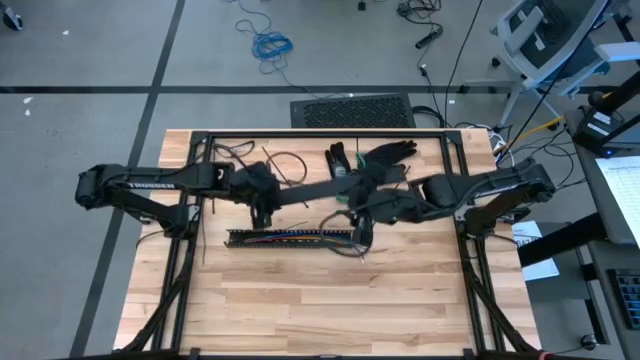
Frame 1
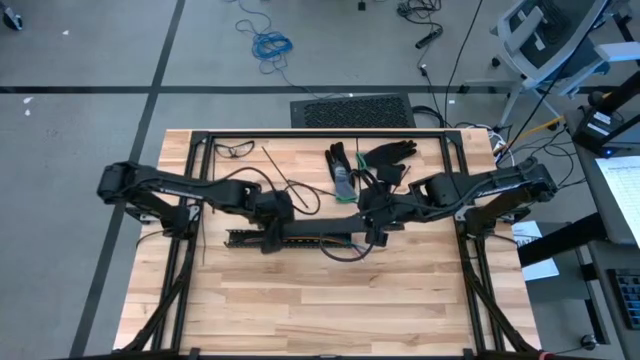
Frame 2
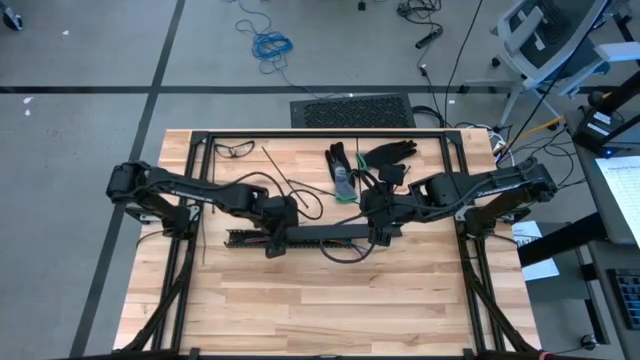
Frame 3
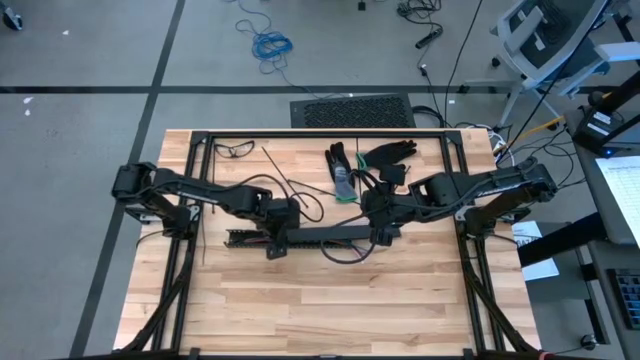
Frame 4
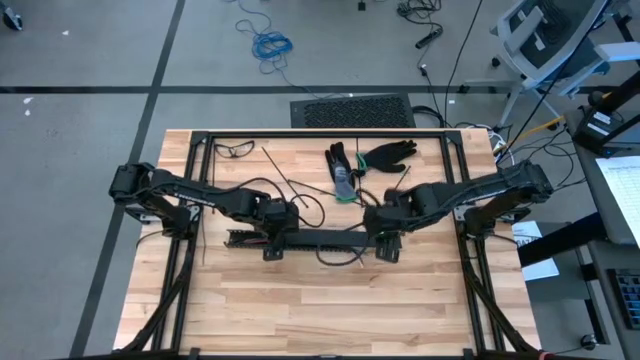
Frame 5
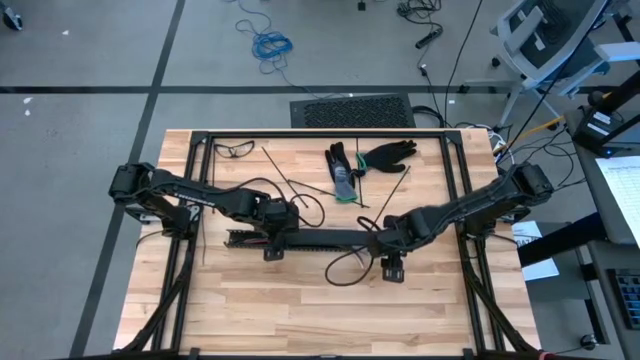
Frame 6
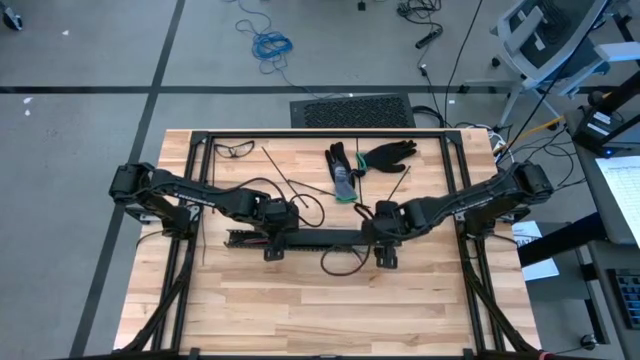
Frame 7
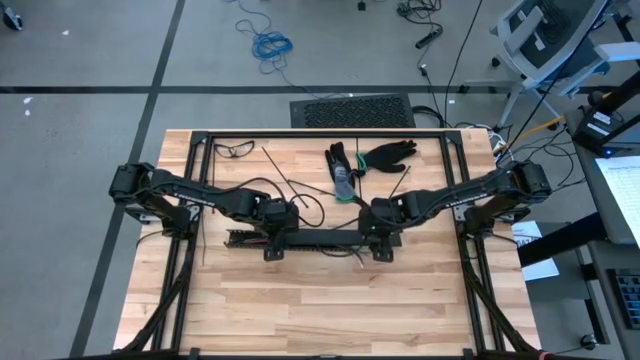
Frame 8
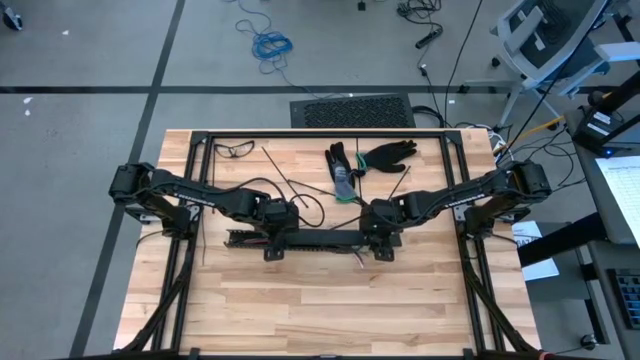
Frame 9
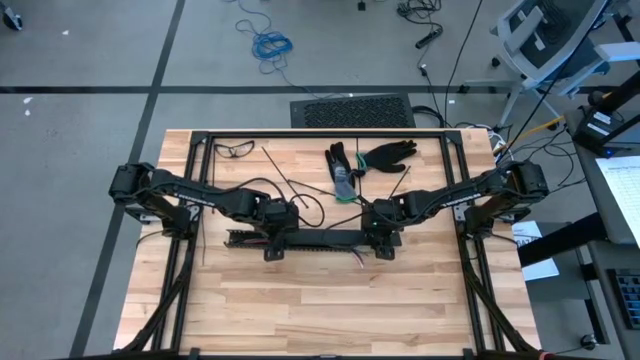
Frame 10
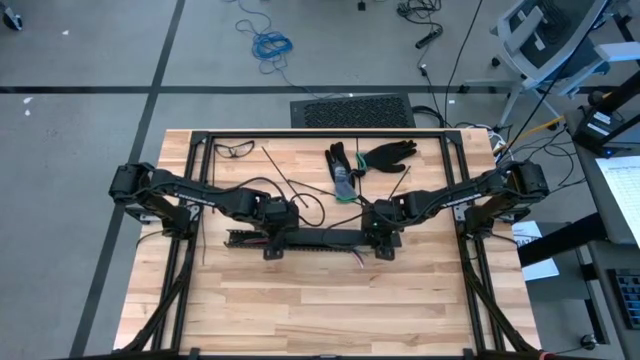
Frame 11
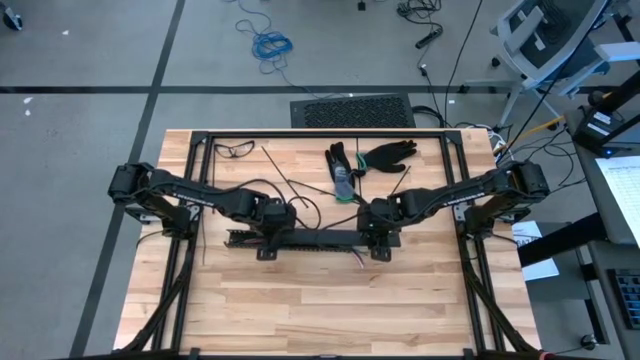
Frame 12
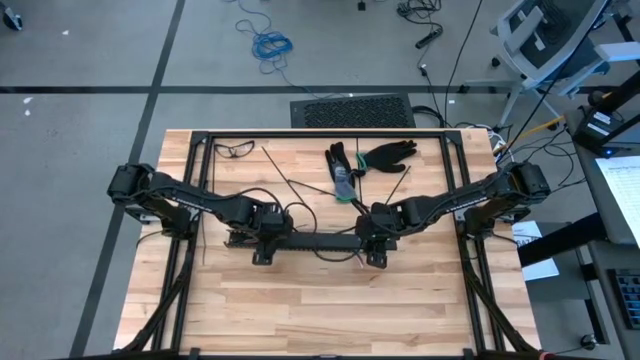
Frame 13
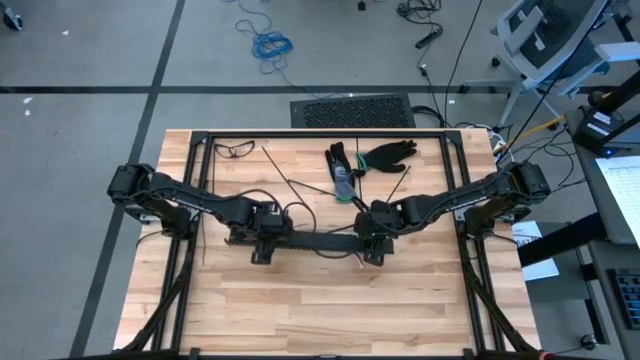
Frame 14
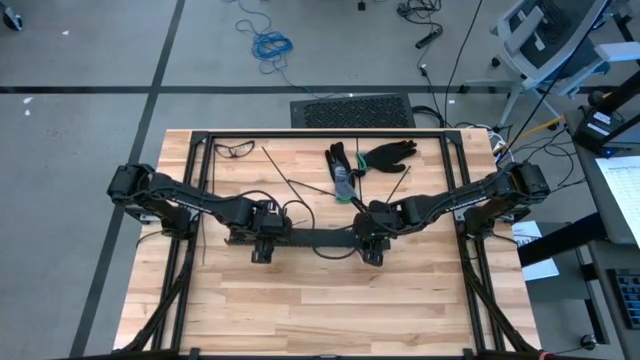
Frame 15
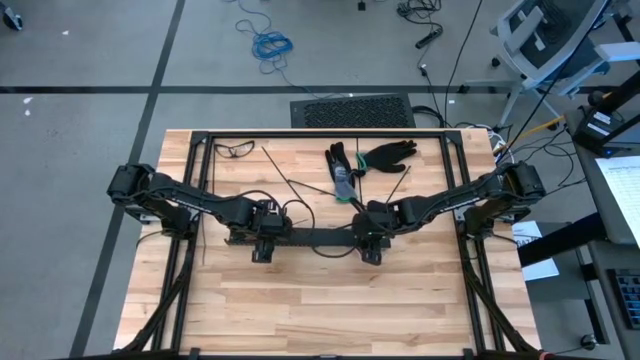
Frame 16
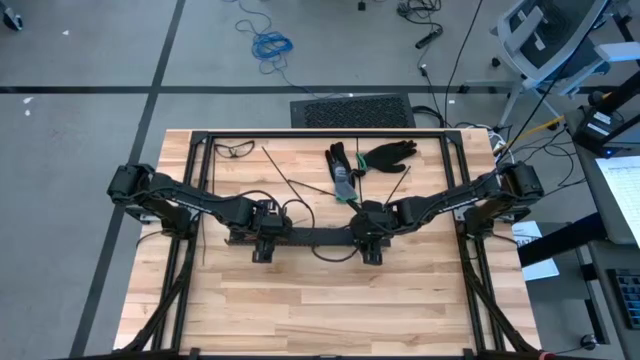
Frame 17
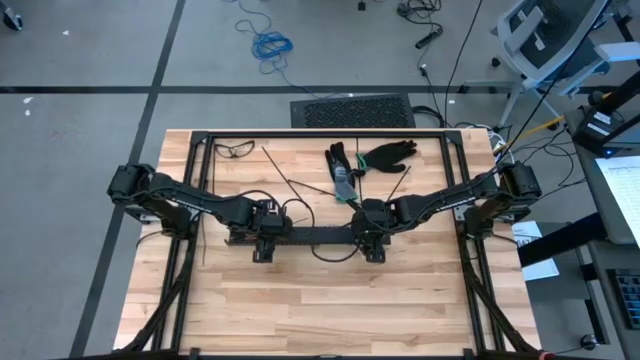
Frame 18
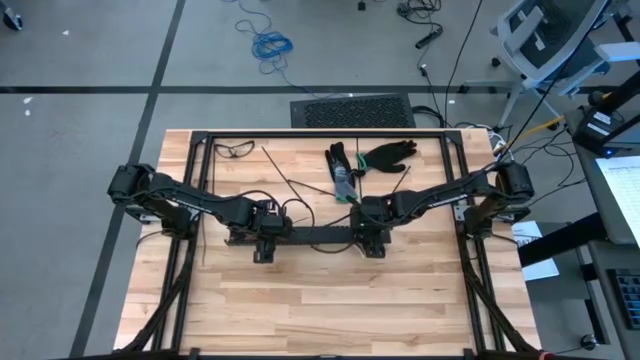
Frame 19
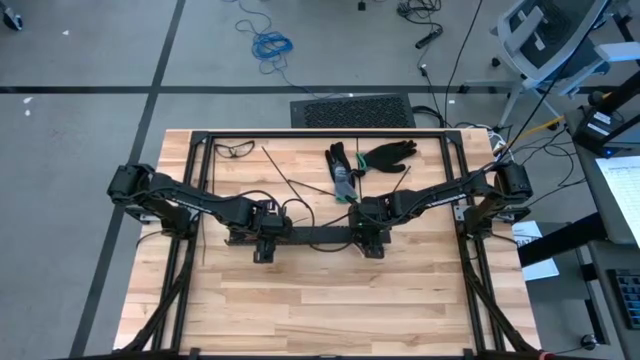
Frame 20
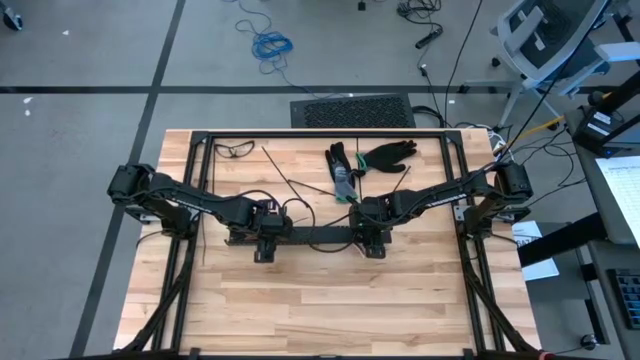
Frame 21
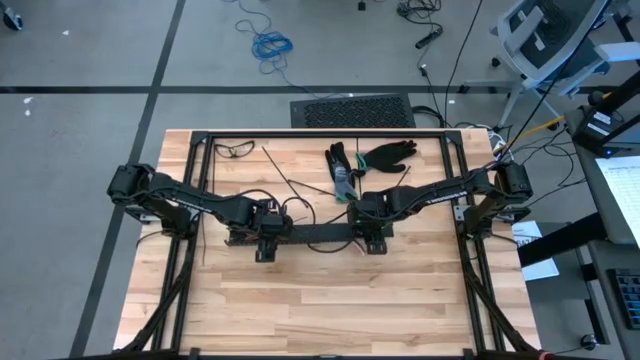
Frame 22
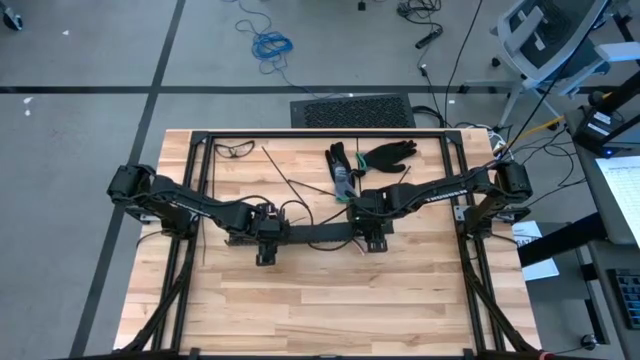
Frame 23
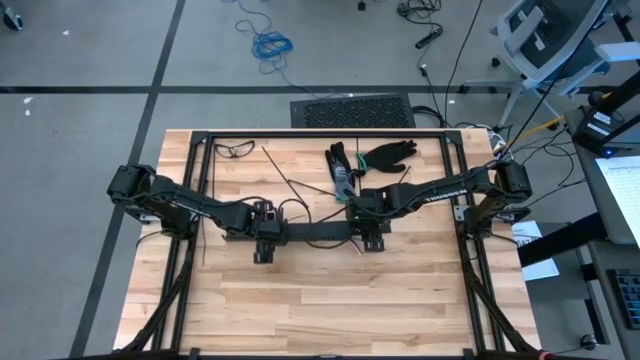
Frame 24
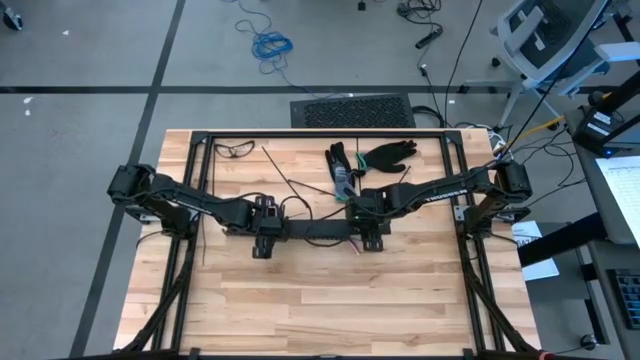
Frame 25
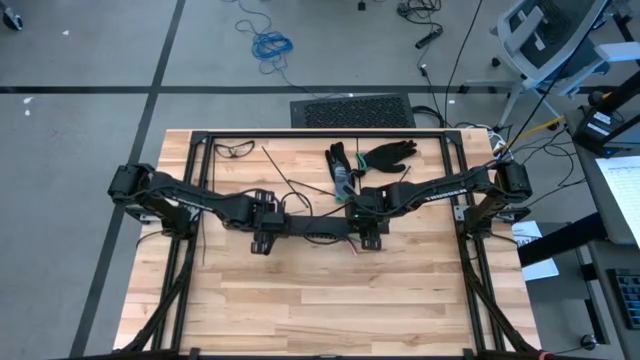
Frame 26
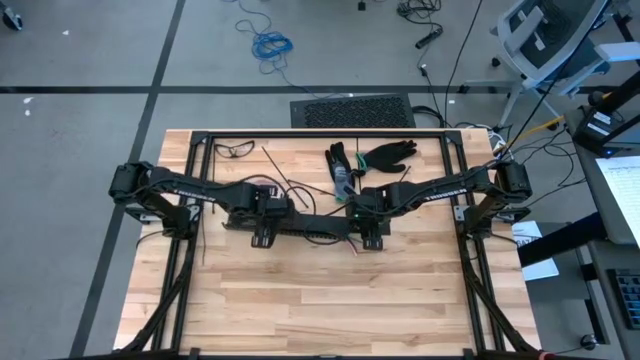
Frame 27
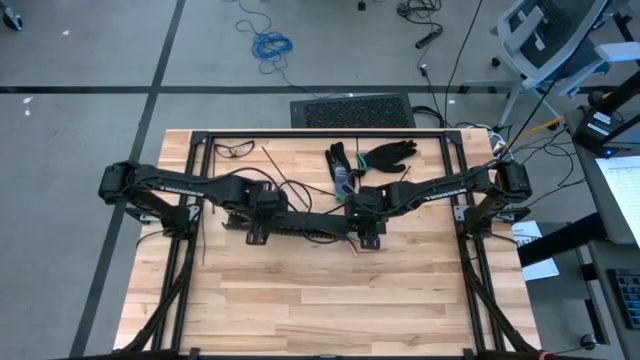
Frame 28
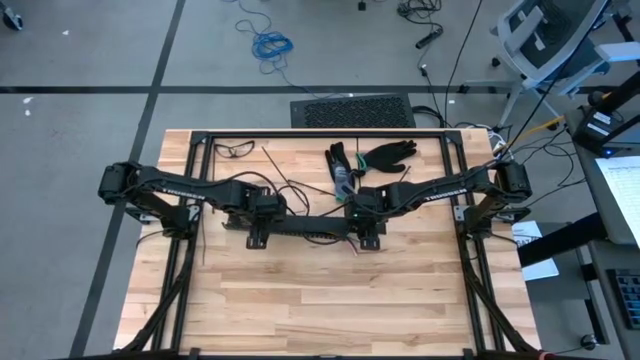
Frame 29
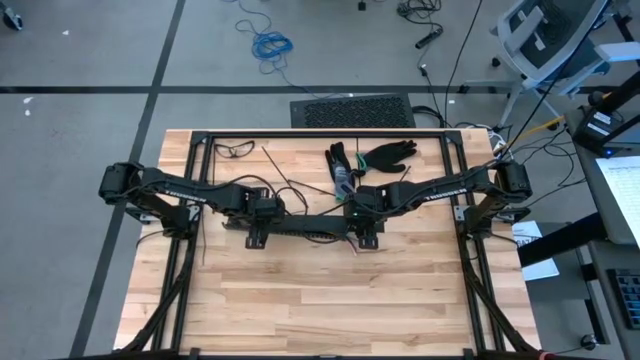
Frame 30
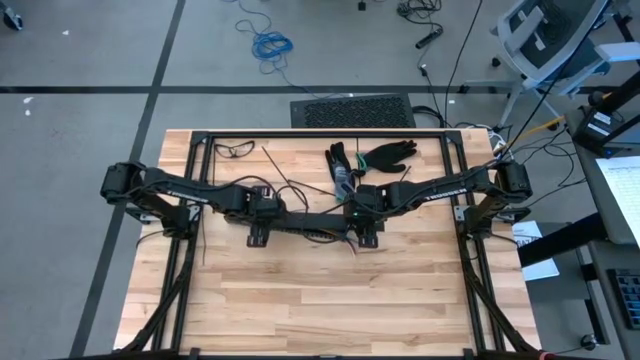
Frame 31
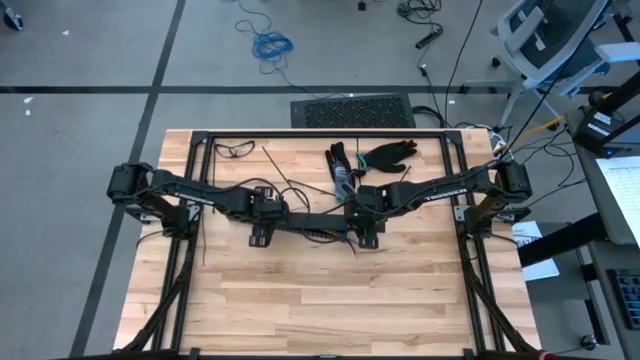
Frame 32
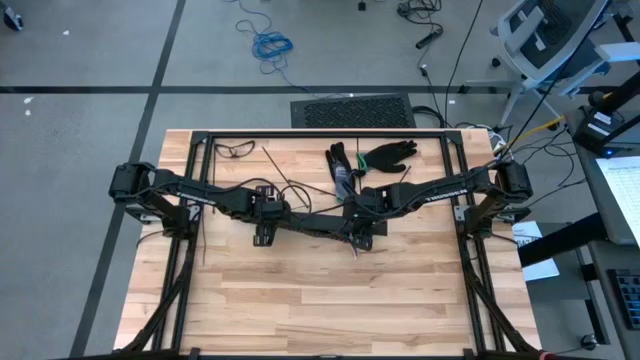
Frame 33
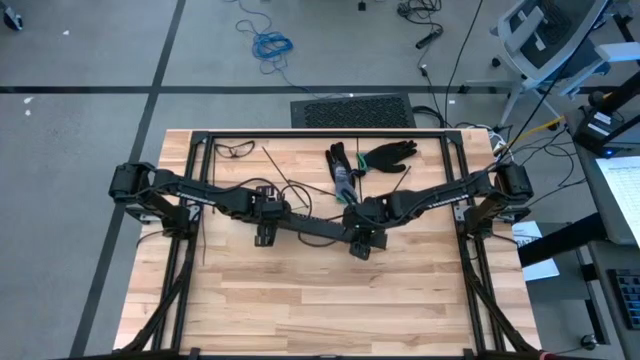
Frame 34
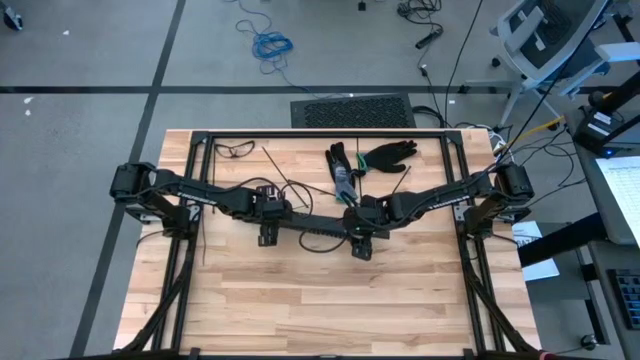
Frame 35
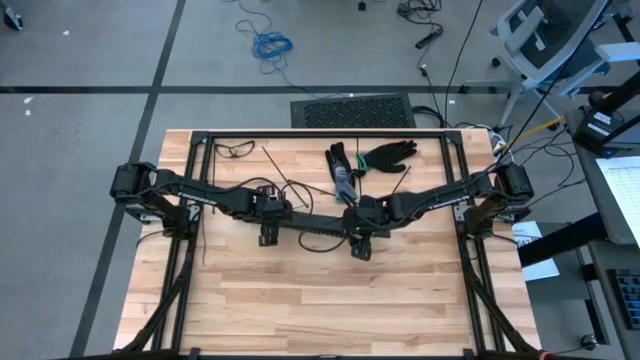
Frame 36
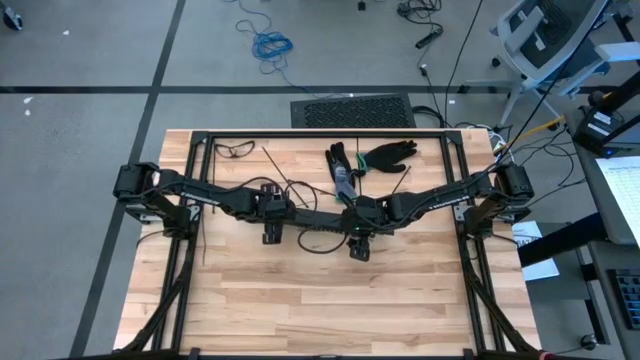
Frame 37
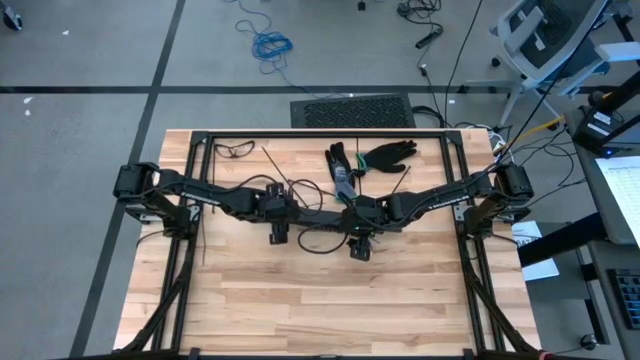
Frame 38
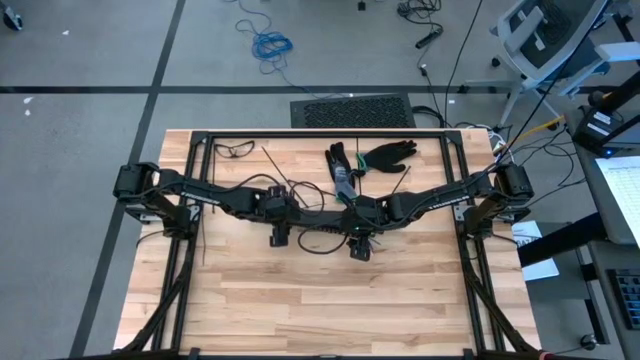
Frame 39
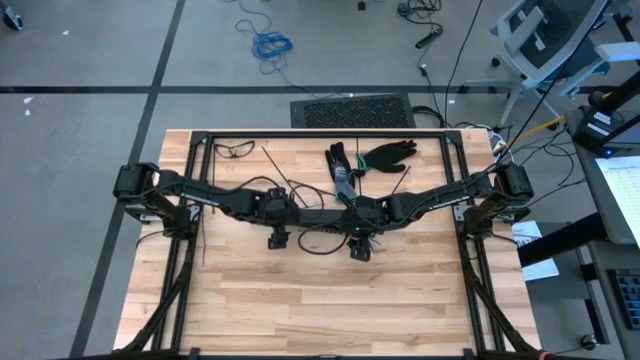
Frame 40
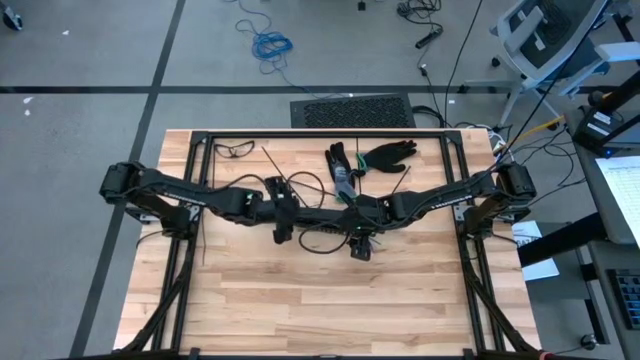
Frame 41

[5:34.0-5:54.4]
Task: Ziptie cables
Close the black cable duct
